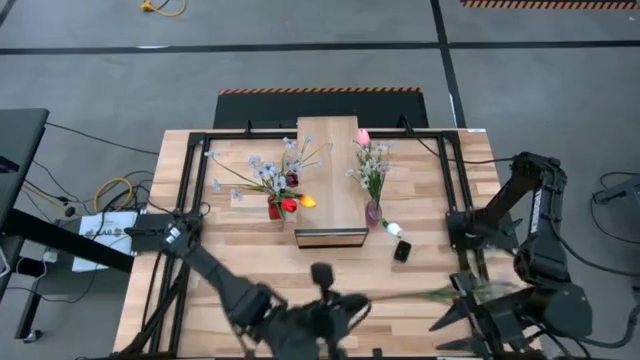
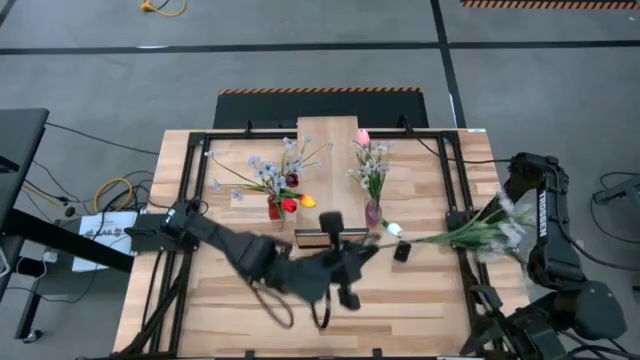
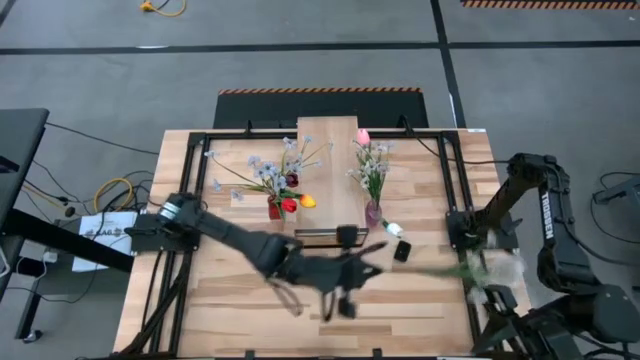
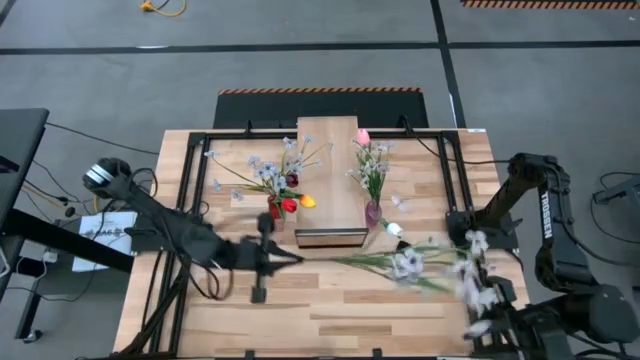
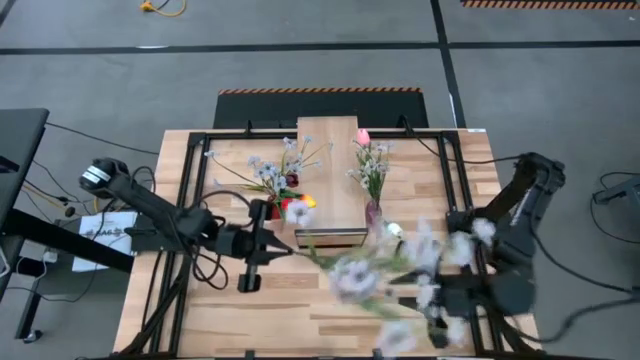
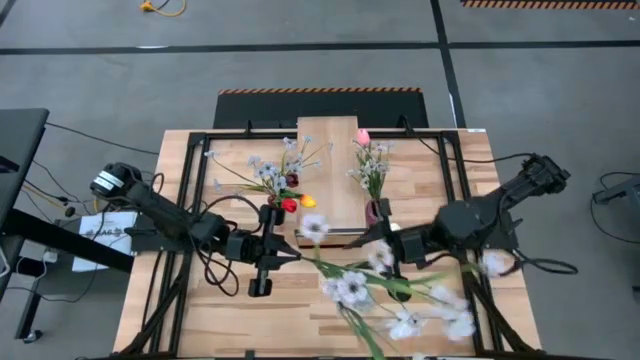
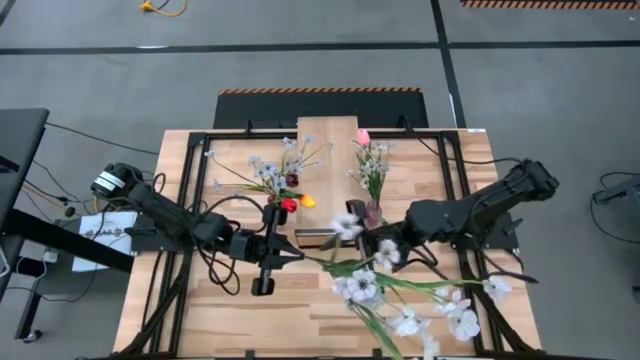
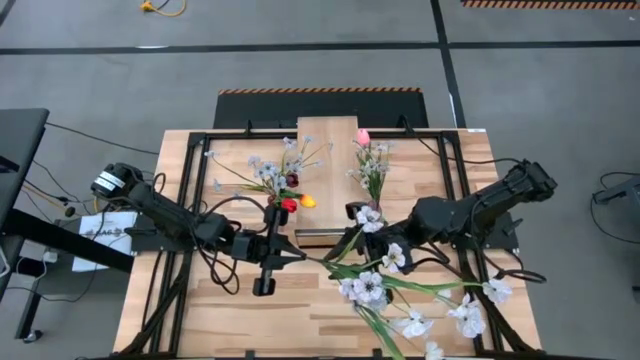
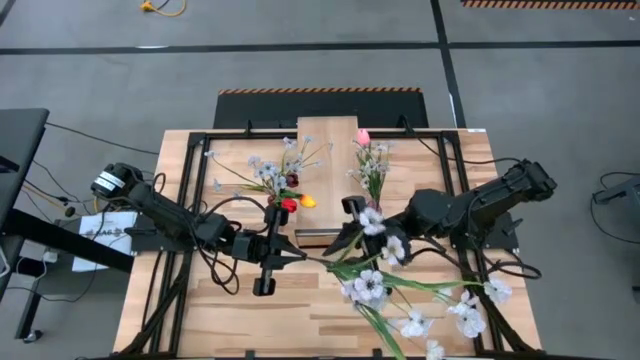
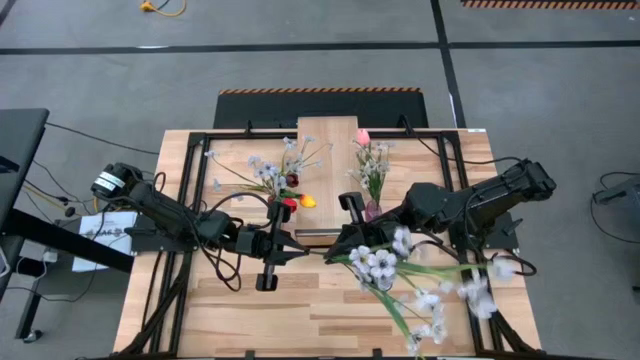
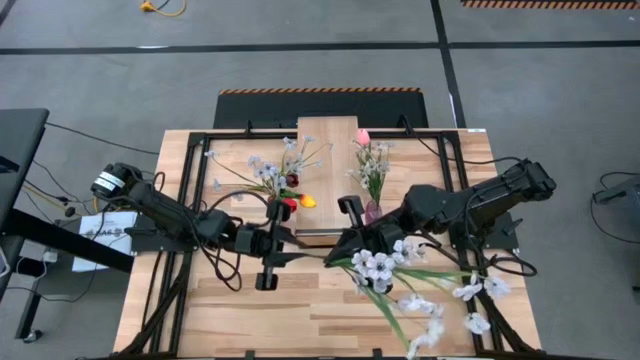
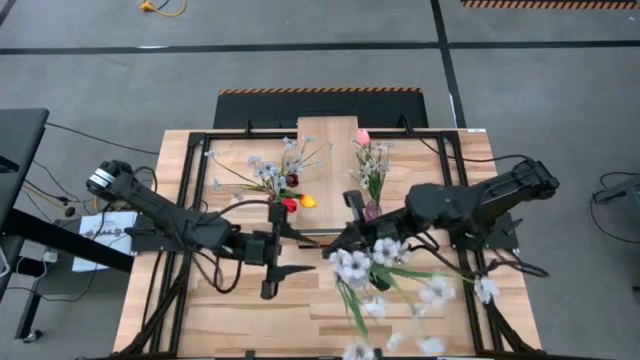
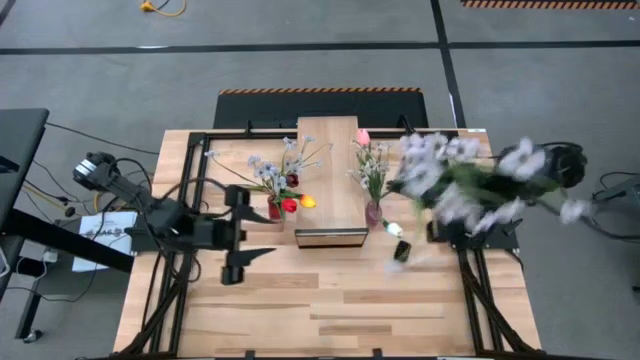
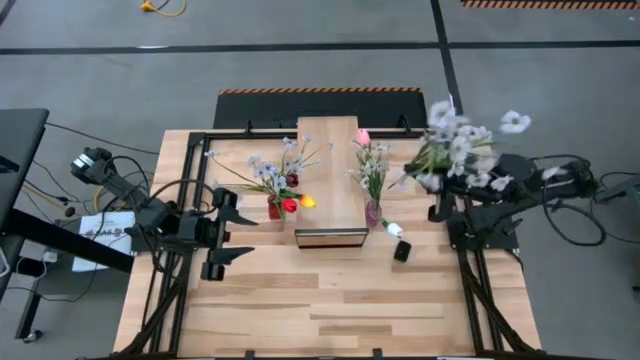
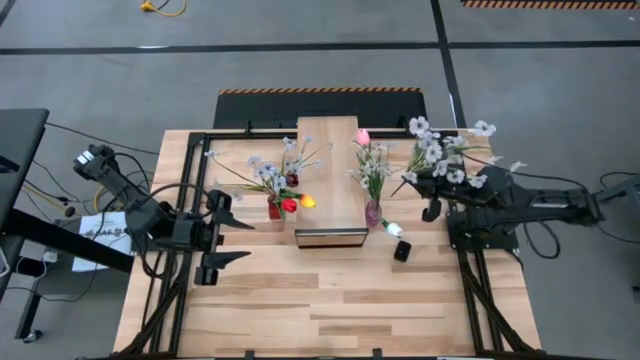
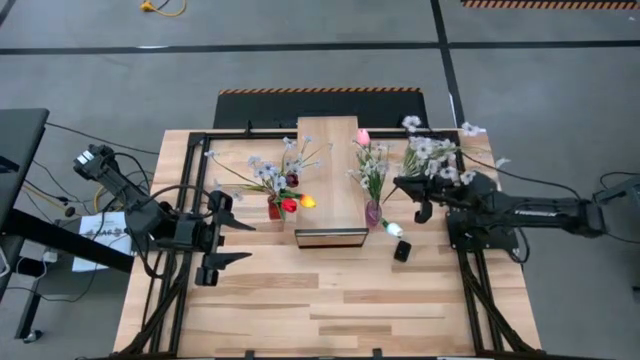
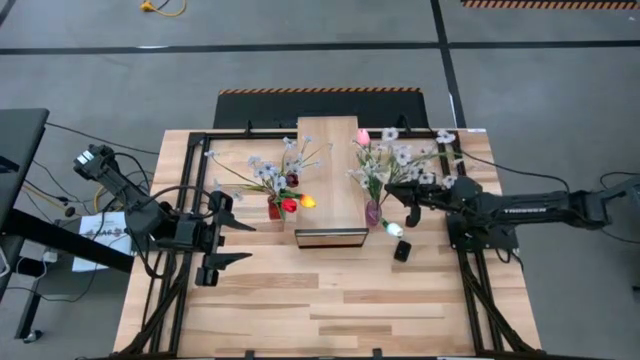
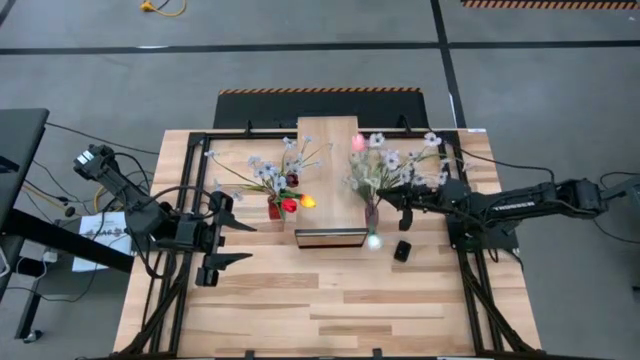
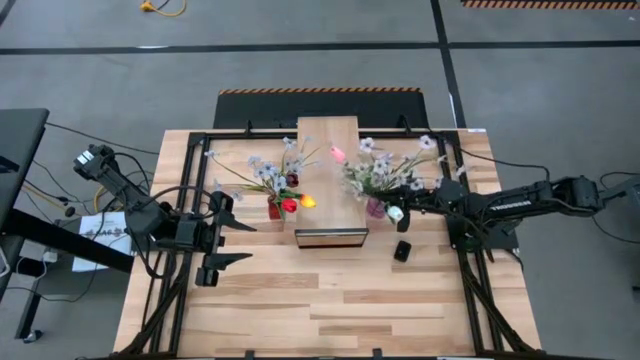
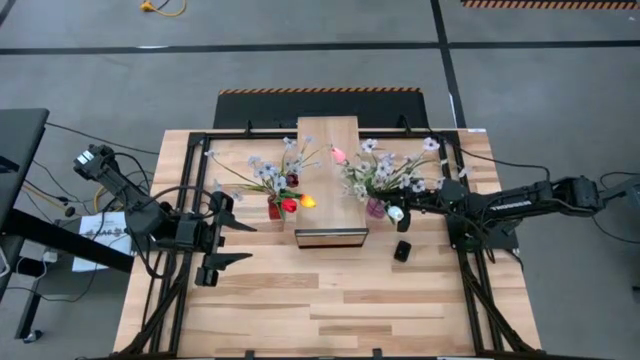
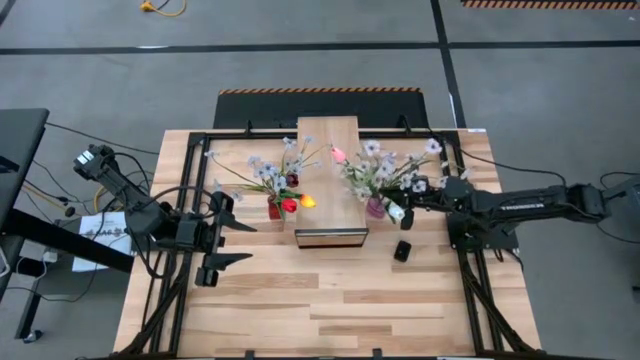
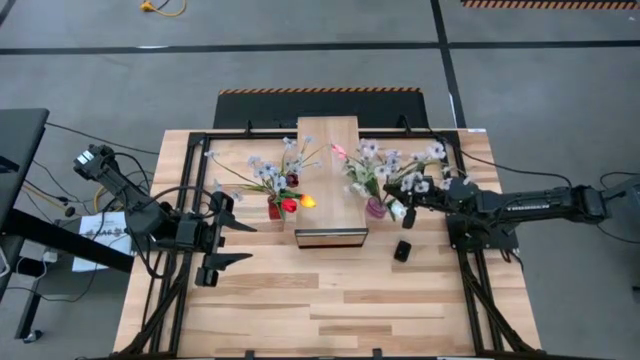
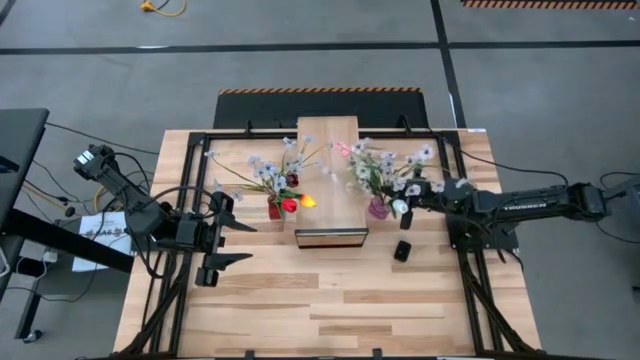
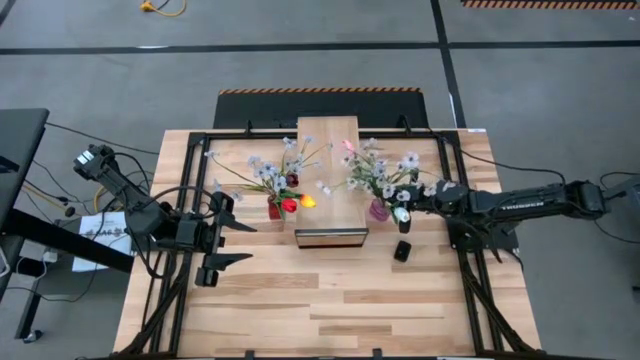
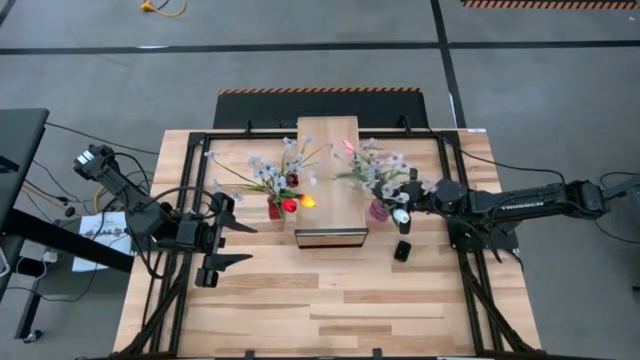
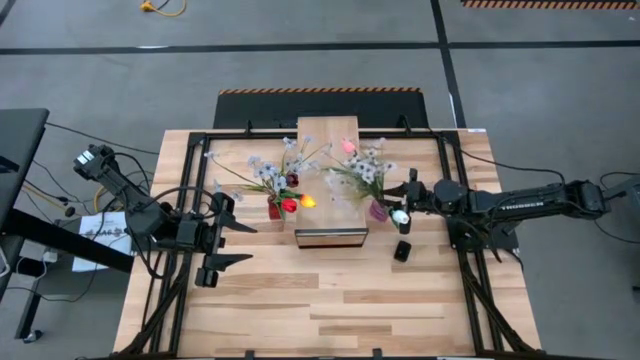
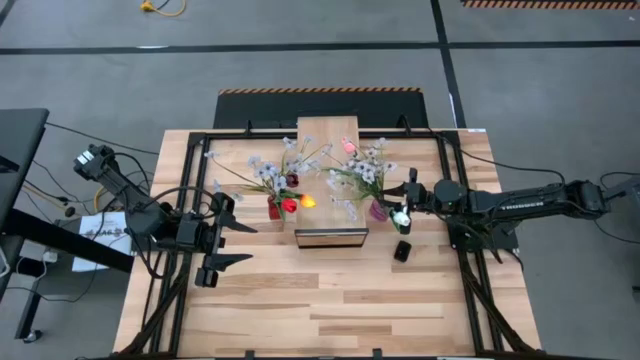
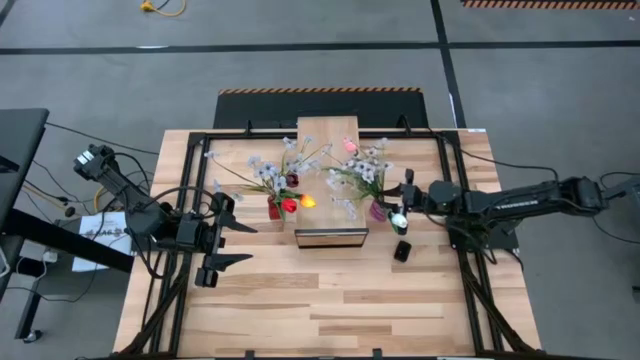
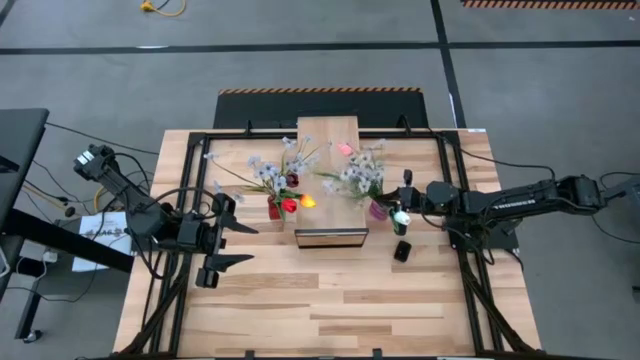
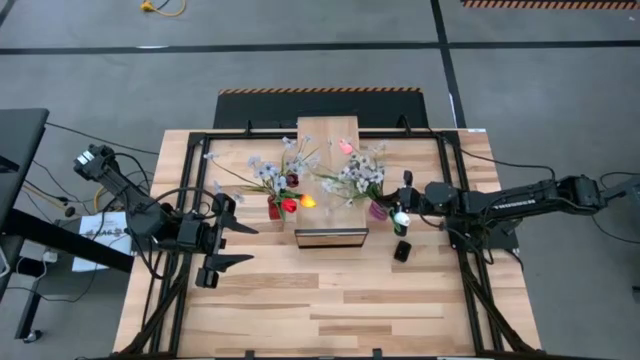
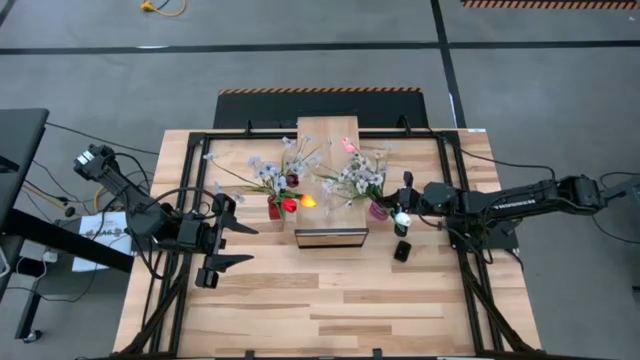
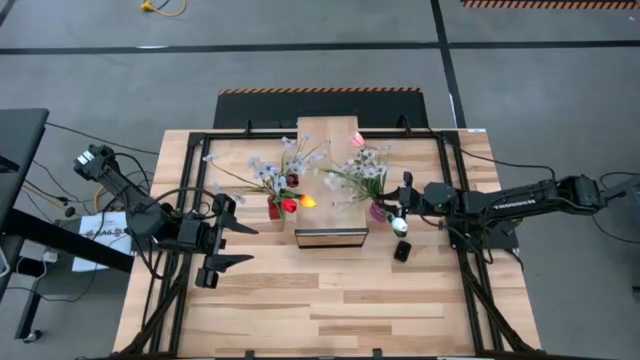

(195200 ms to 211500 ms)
Task: Pick and place flowers into a vace then onto a shelf
Put the white flowers into the purple flower vase

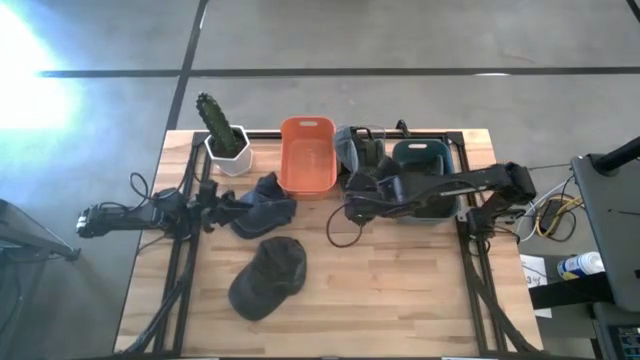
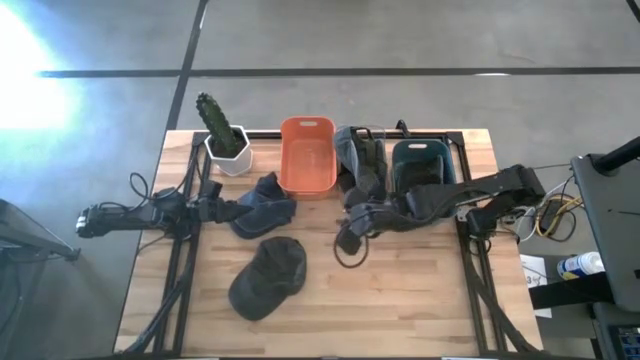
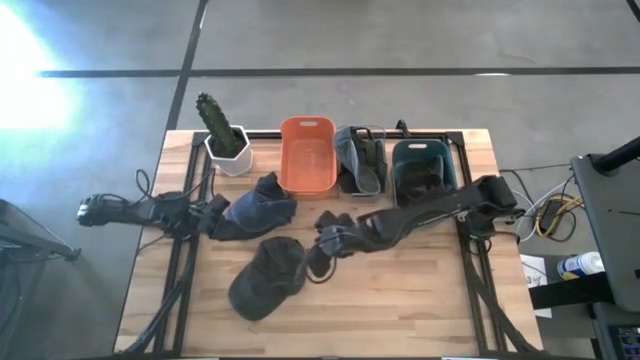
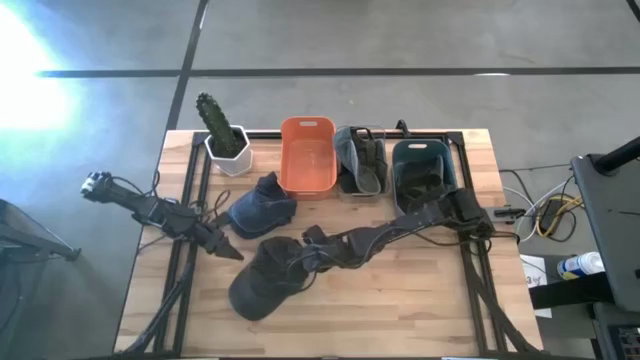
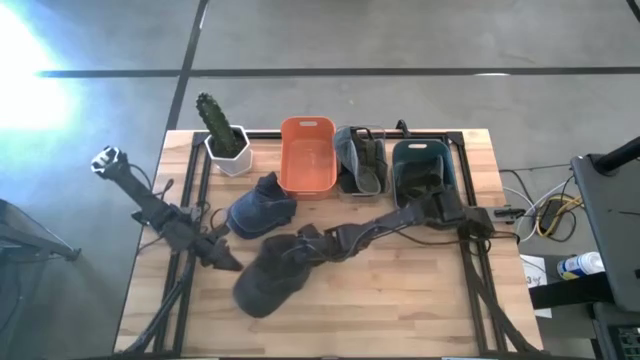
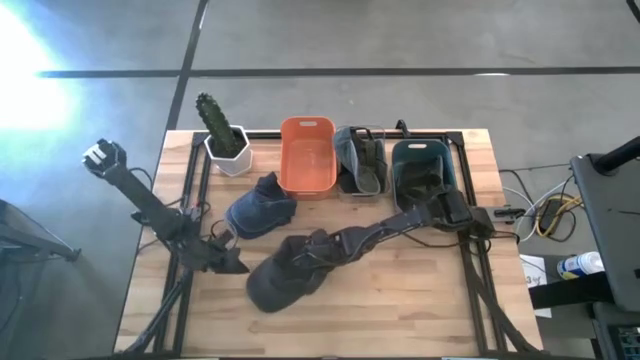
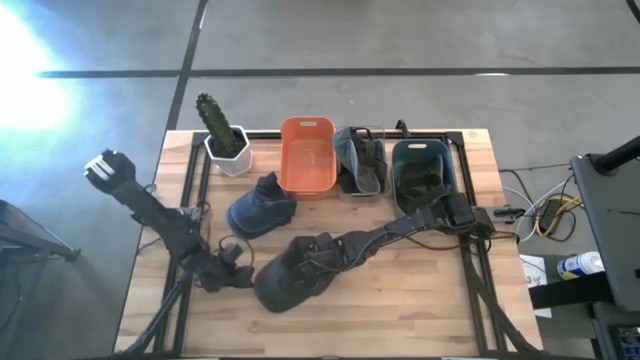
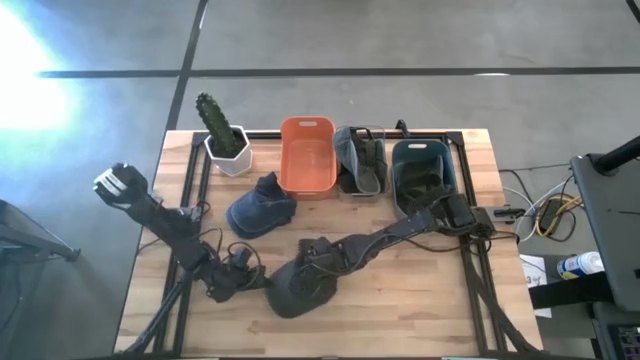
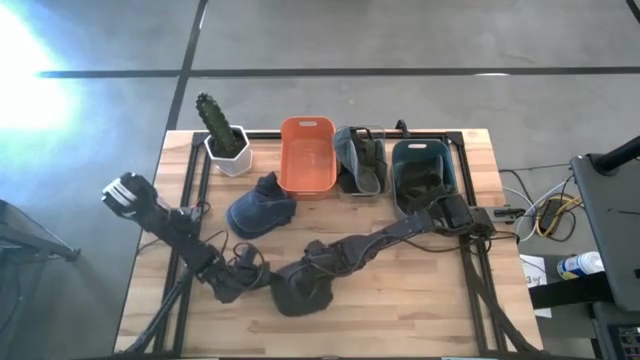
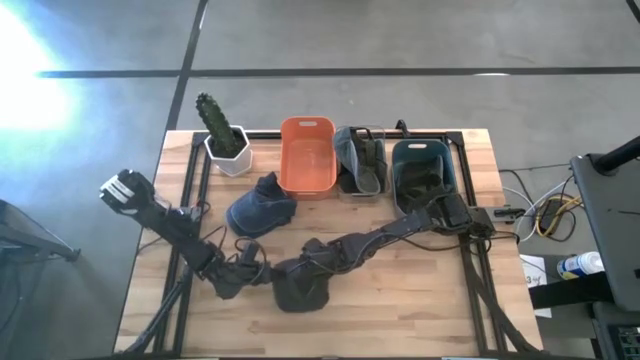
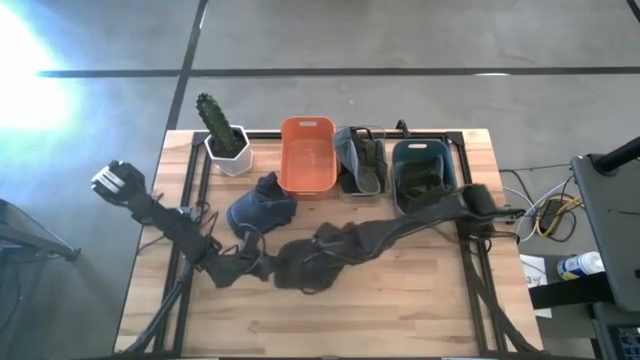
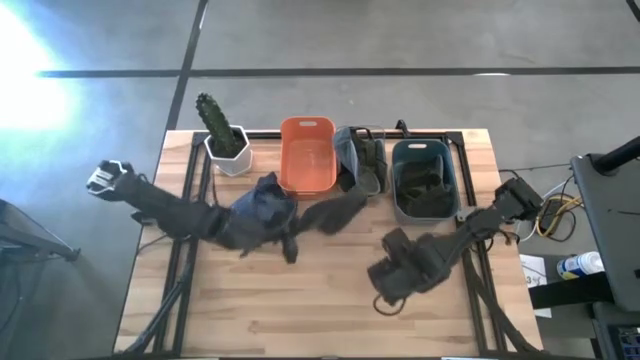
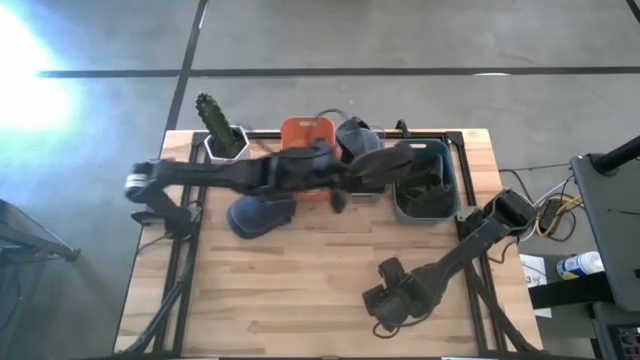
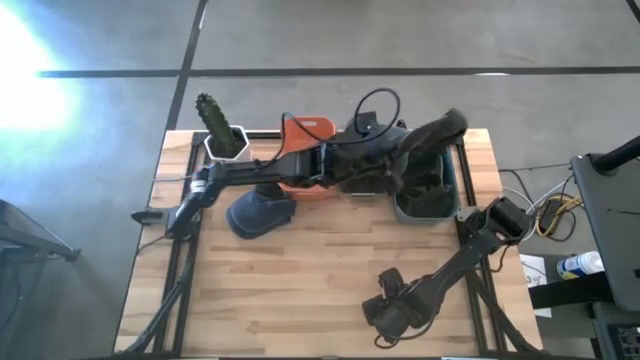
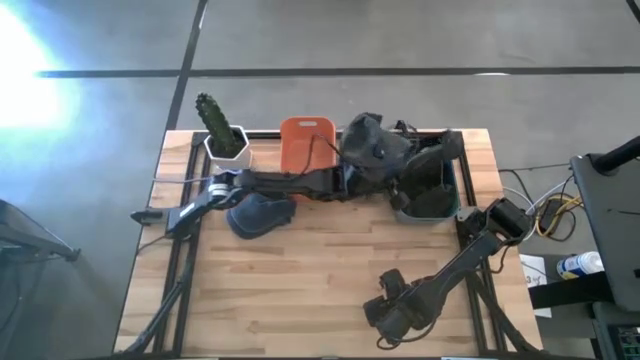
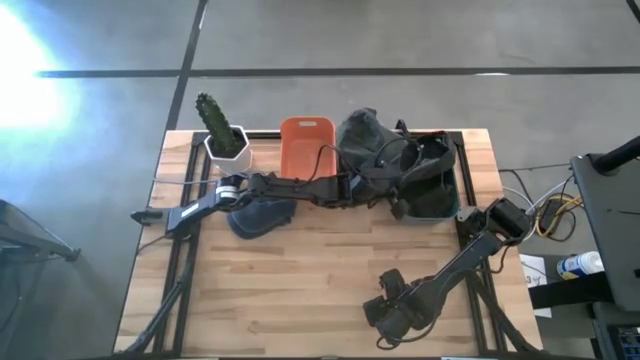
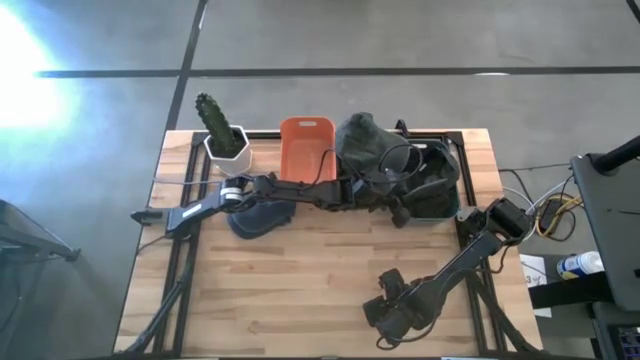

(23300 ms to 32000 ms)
Task: Pick & Place hat
Put the black cap into the blue bin
